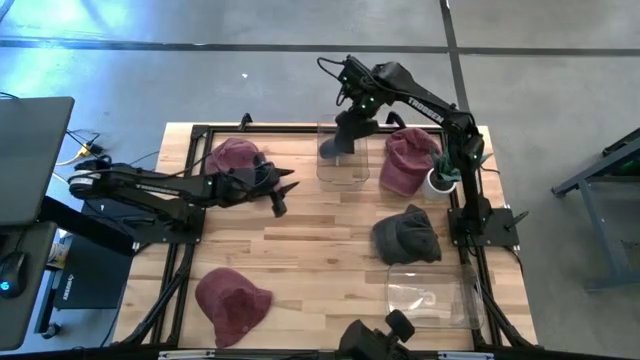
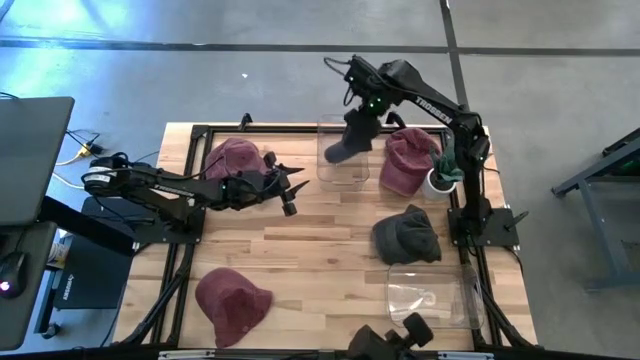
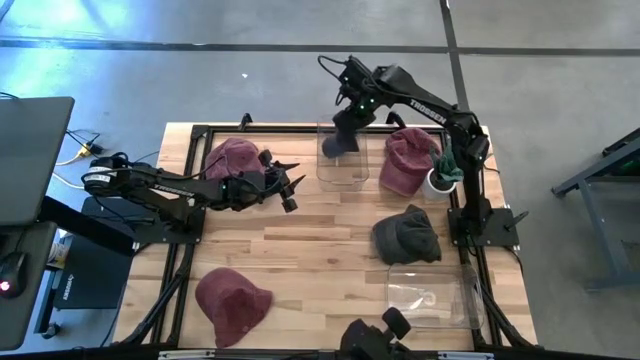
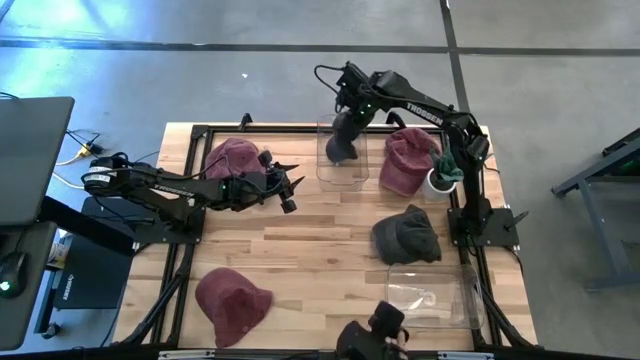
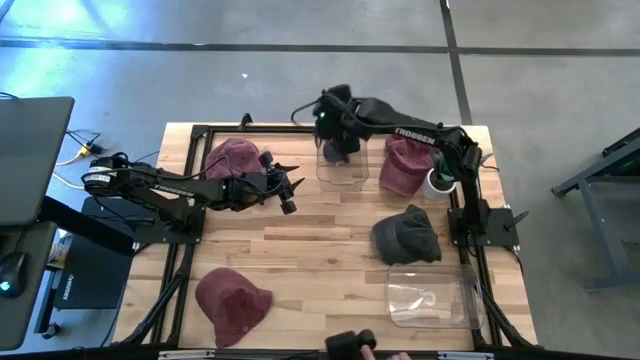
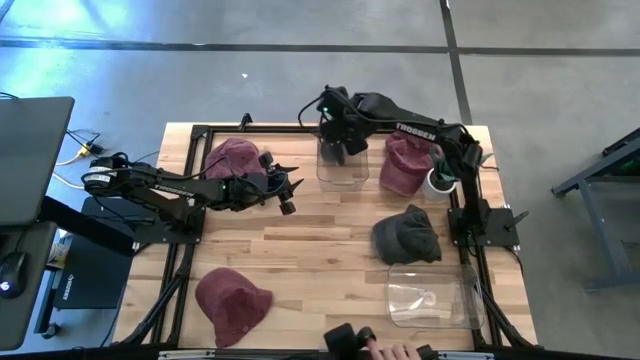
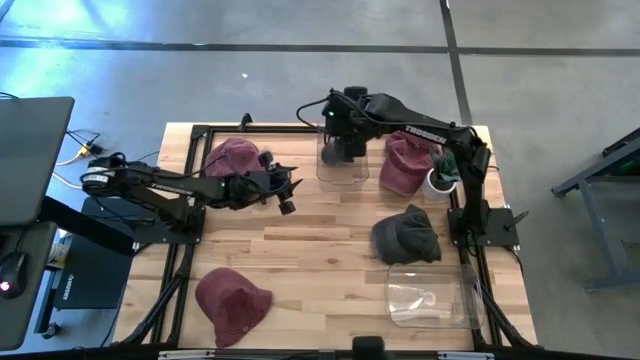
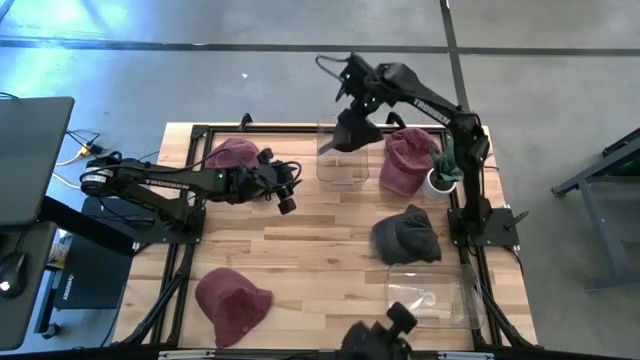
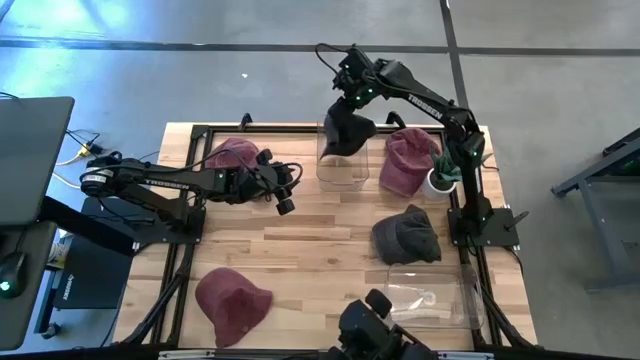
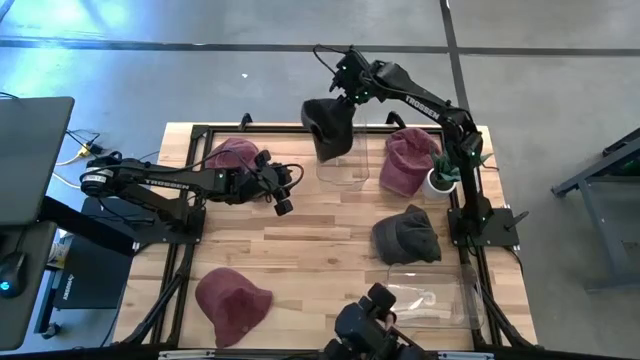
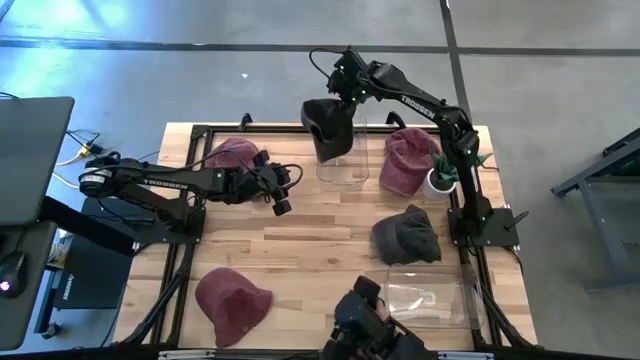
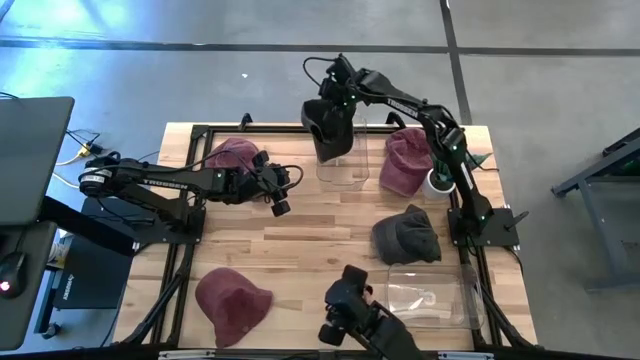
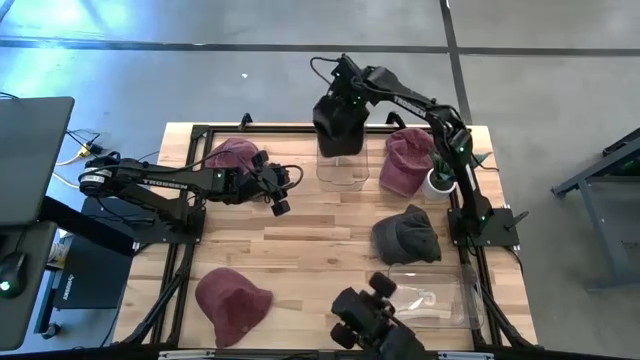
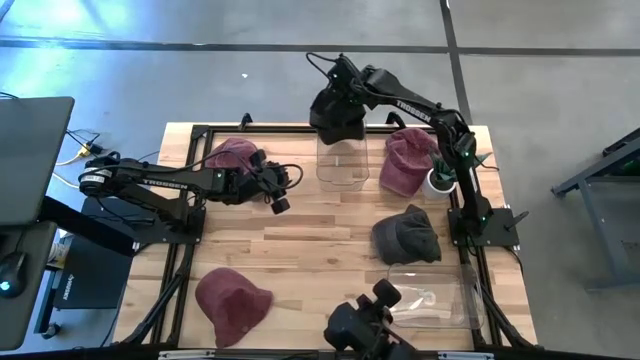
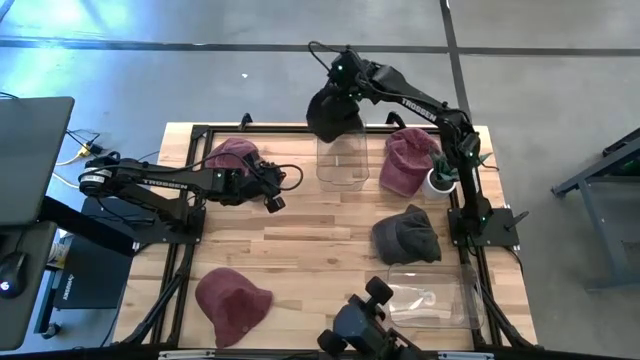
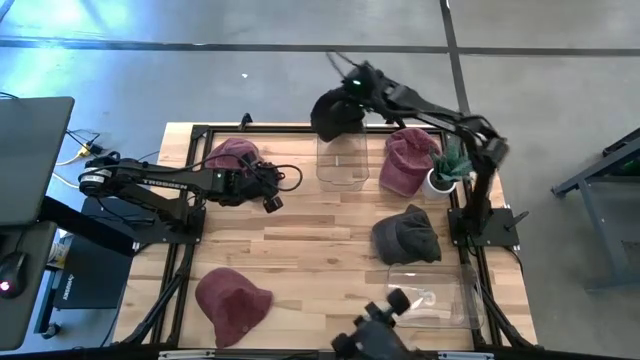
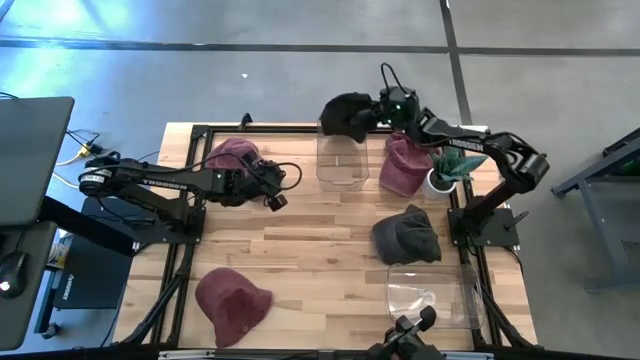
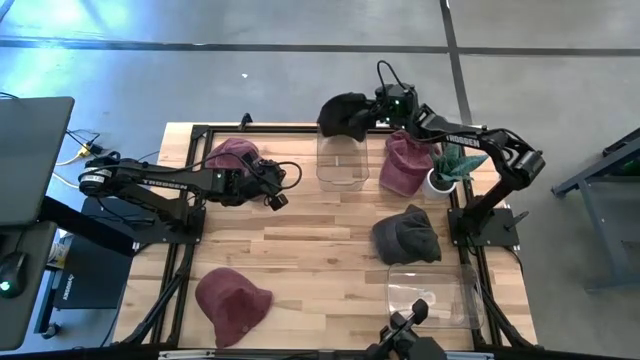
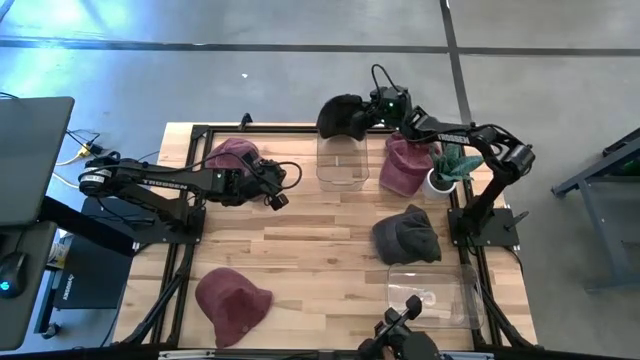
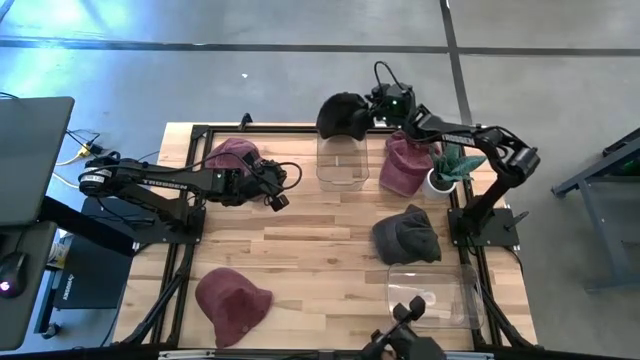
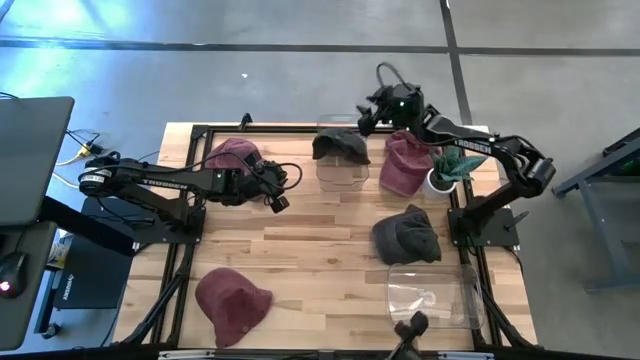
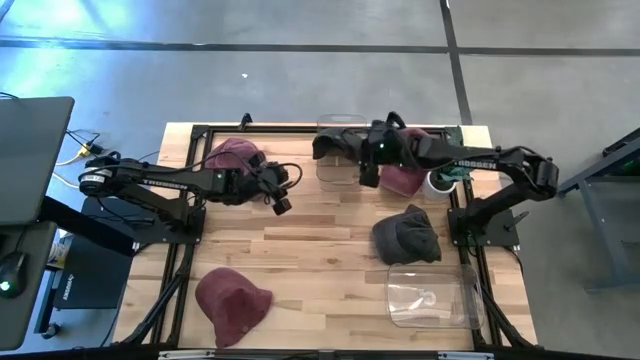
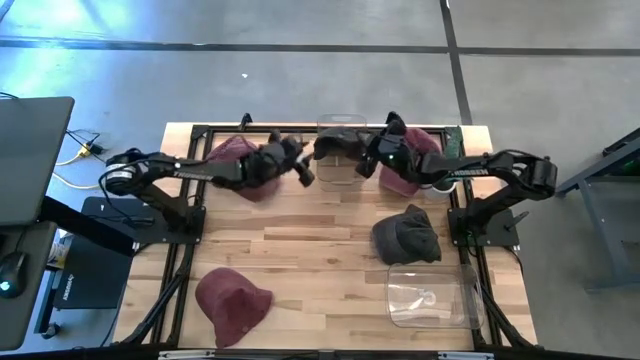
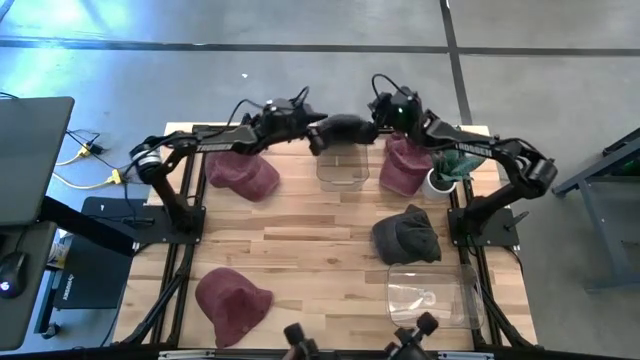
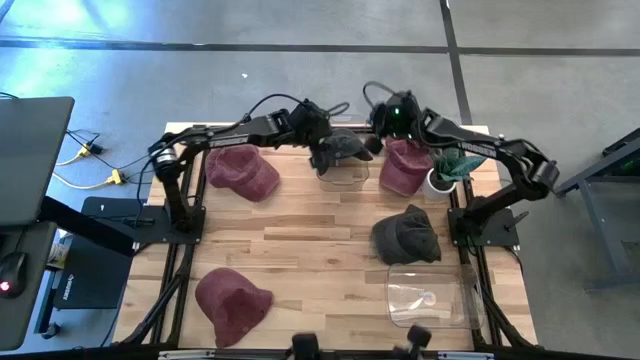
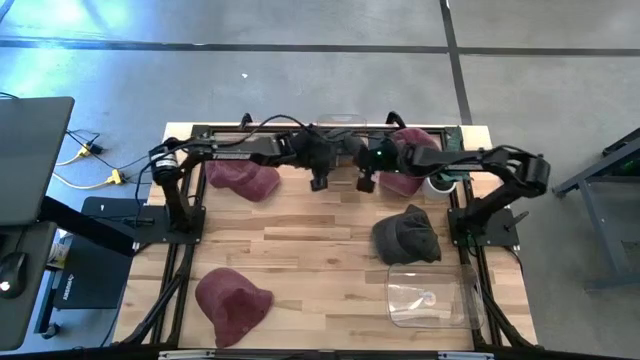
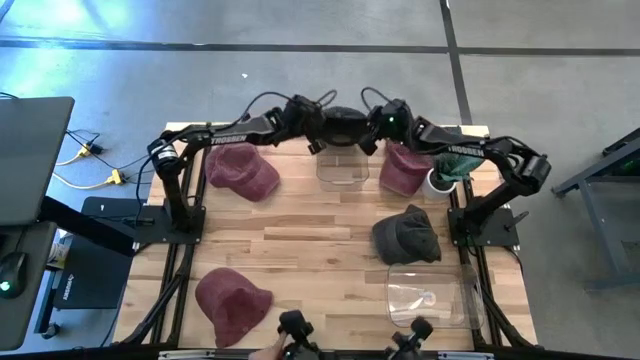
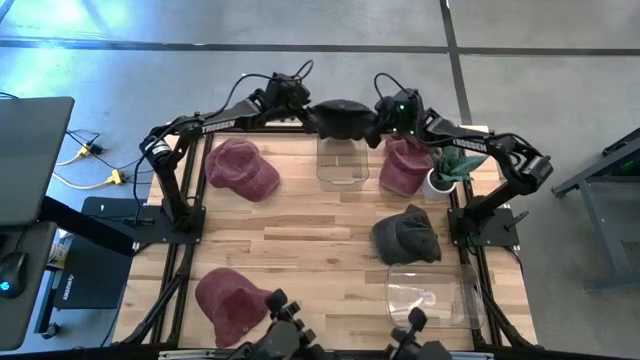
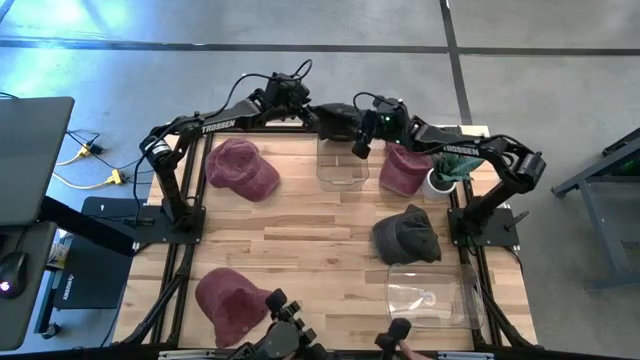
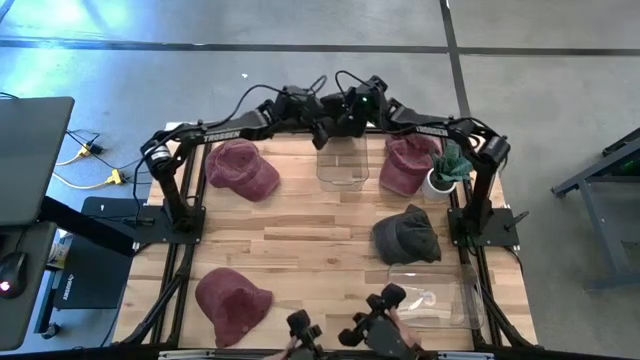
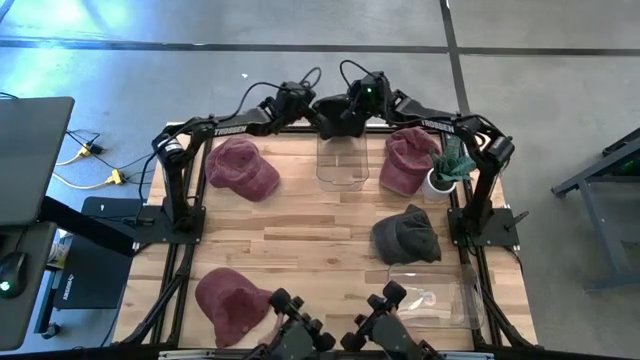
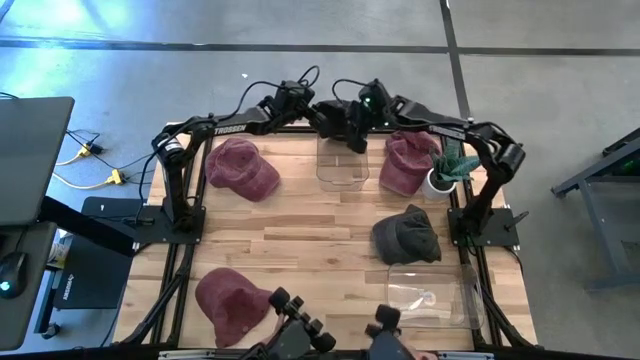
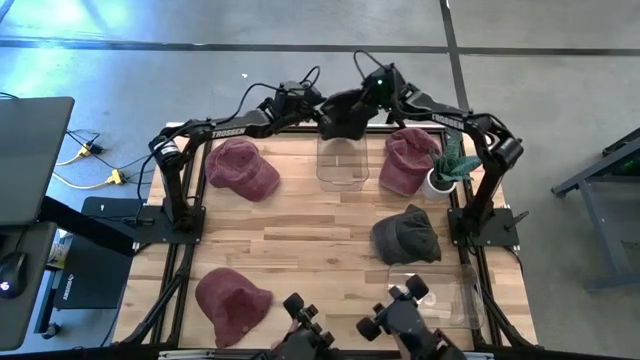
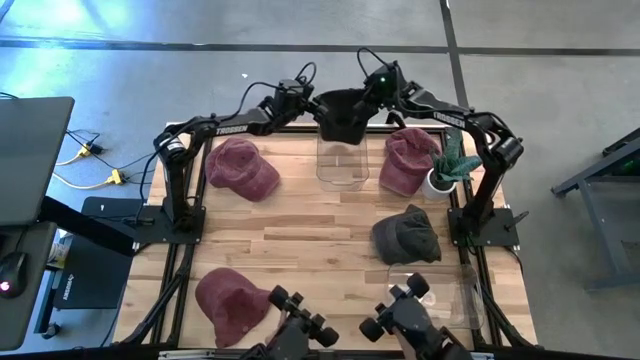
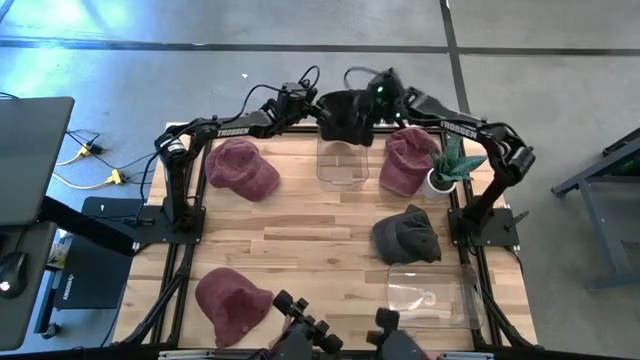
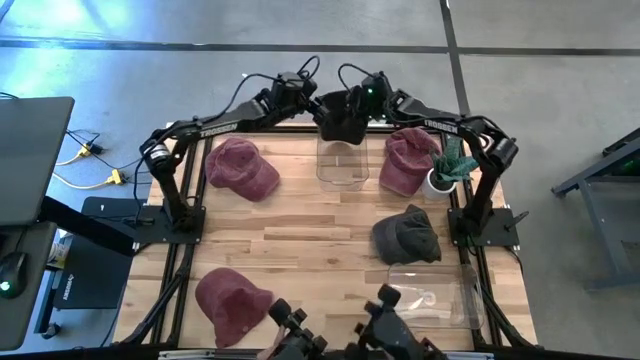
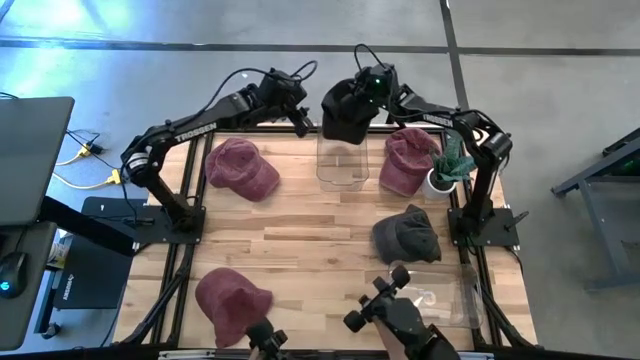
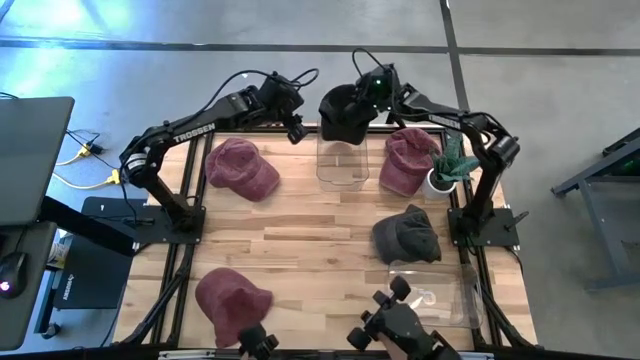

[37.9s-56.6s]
Task: Pick & Place hat
Put the left black cap into the top transparent bin

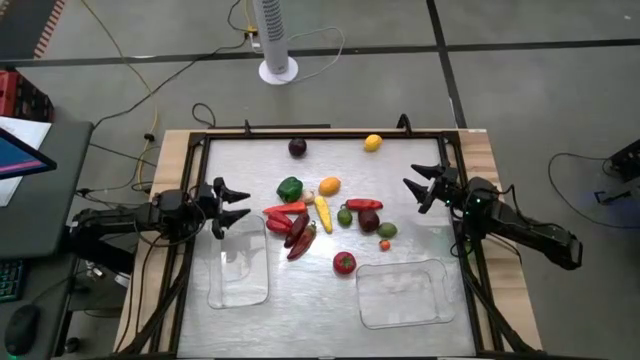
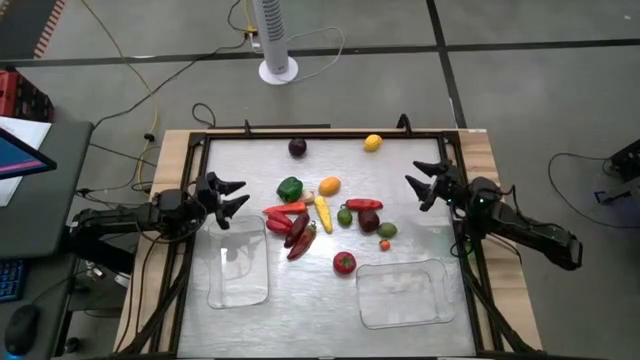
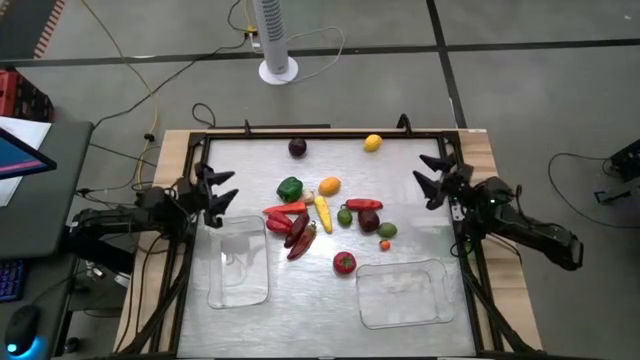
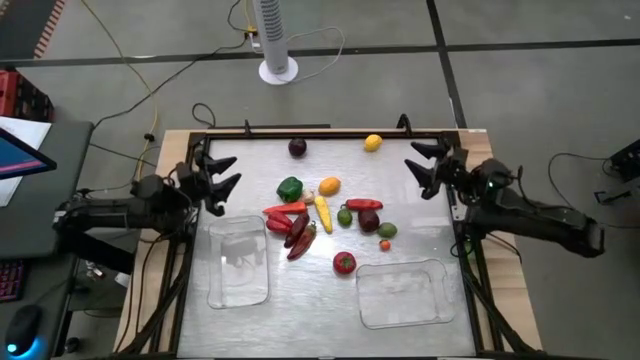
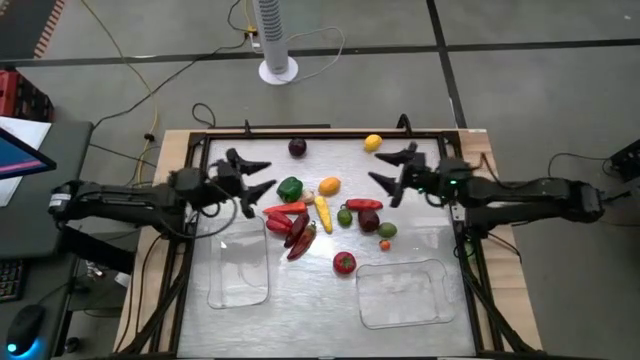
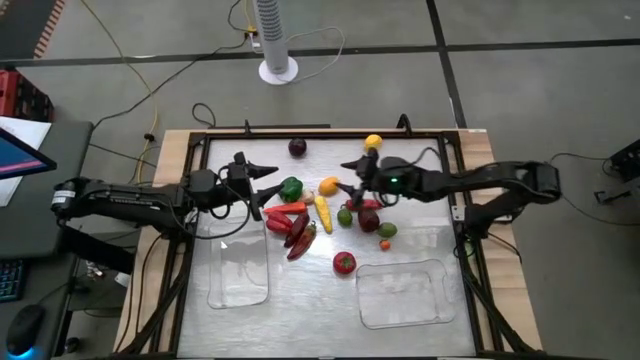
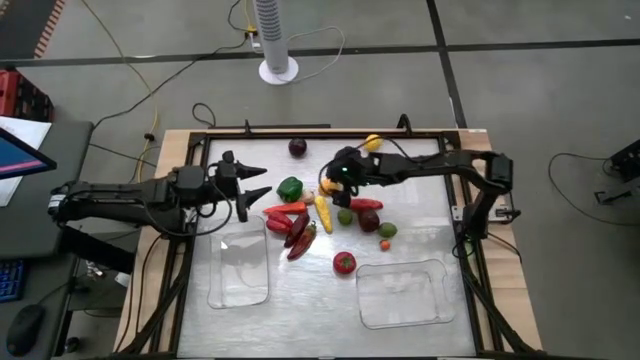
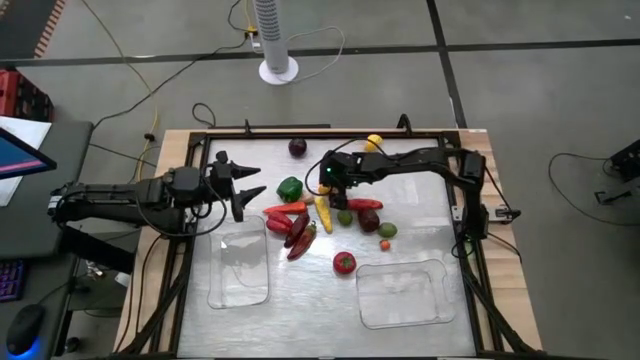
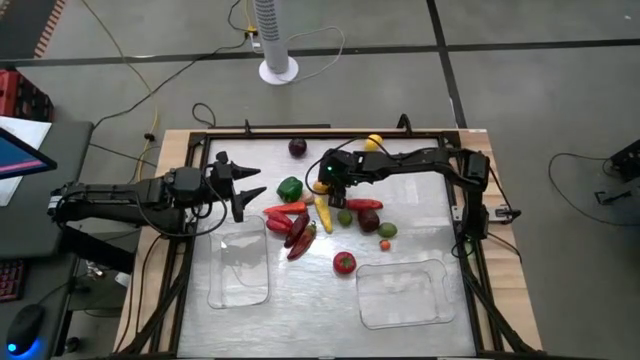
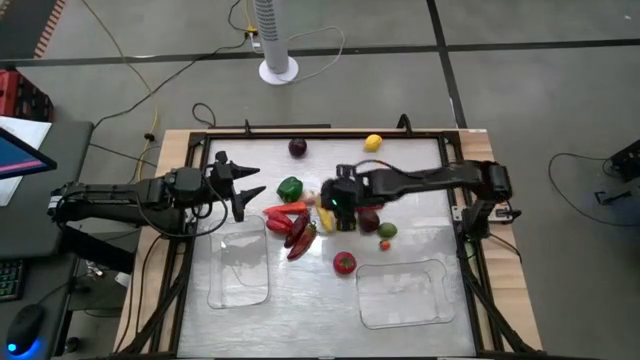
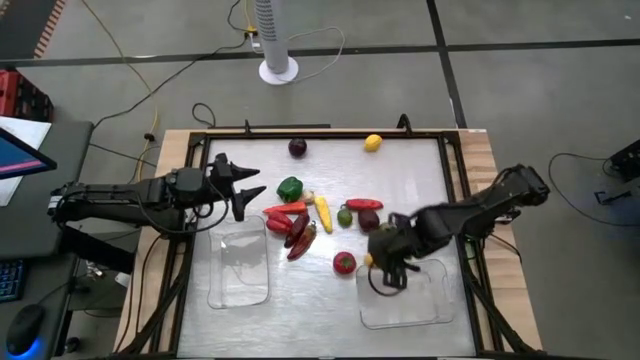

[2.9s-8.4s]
Task: Sort produce into baskets
Put the bottom lemon into the right transparent bin
